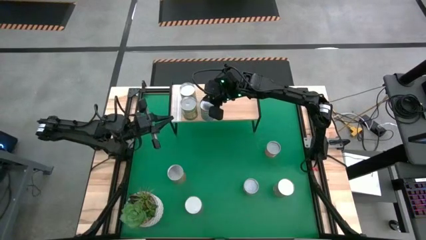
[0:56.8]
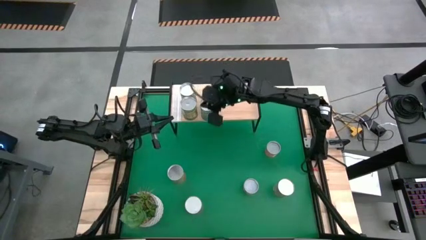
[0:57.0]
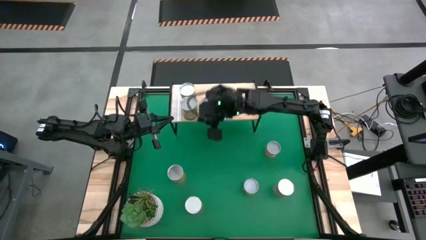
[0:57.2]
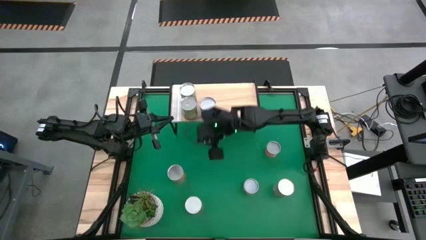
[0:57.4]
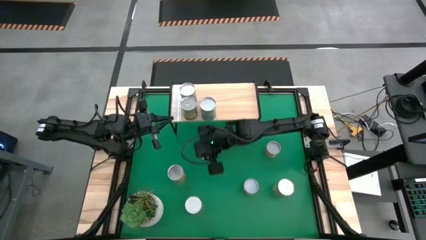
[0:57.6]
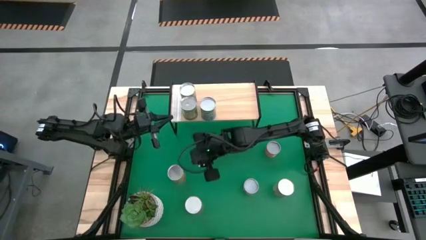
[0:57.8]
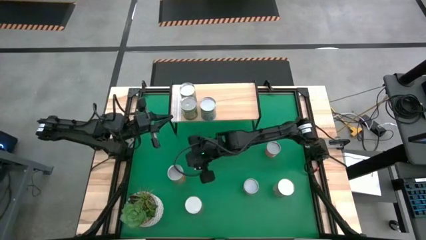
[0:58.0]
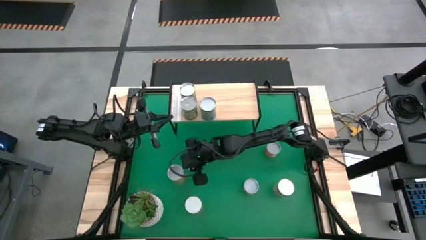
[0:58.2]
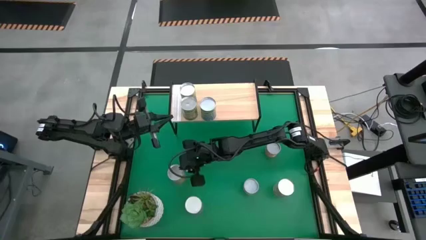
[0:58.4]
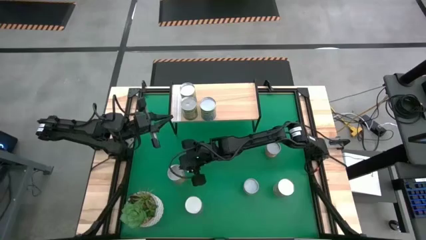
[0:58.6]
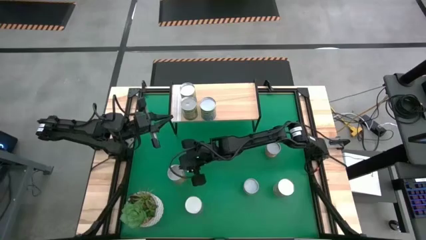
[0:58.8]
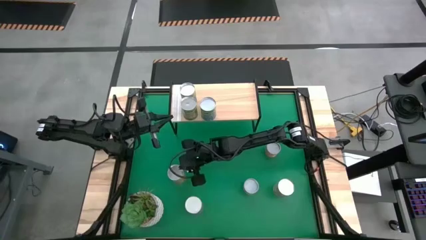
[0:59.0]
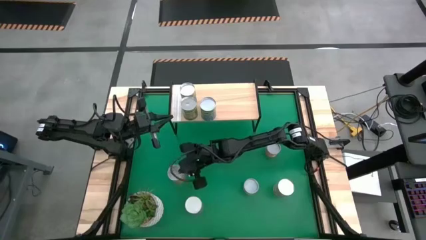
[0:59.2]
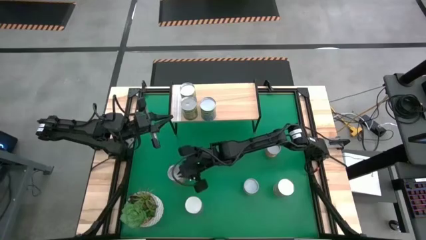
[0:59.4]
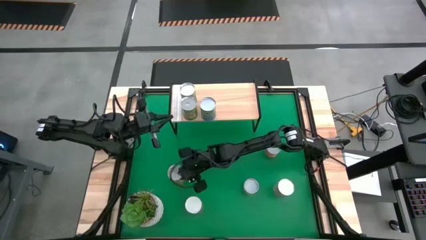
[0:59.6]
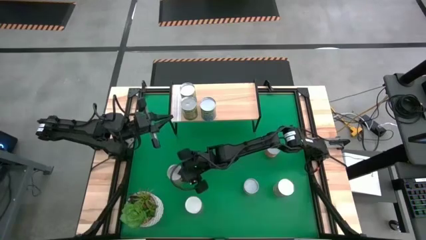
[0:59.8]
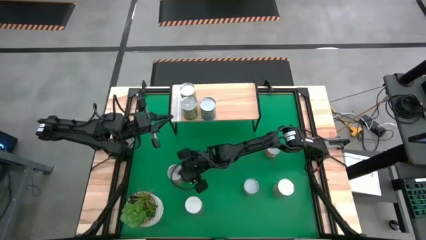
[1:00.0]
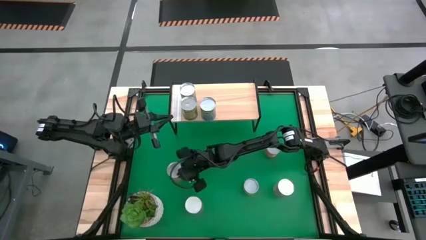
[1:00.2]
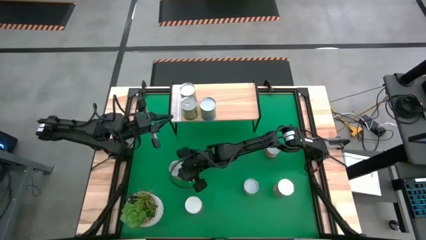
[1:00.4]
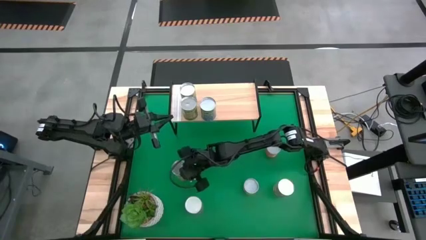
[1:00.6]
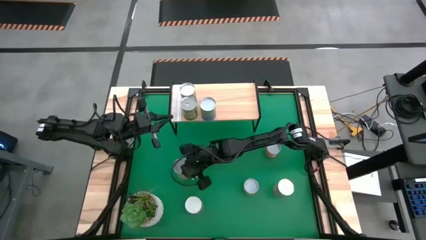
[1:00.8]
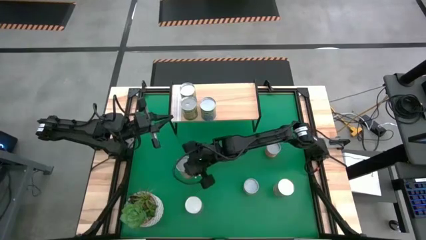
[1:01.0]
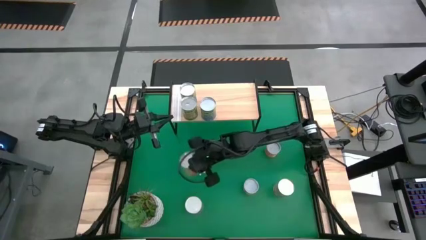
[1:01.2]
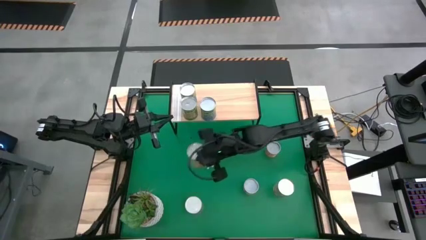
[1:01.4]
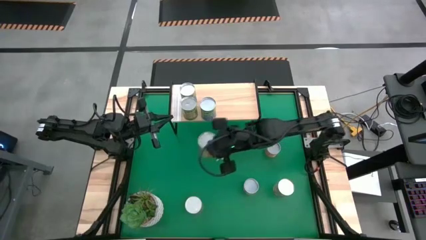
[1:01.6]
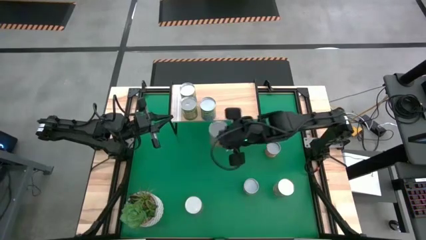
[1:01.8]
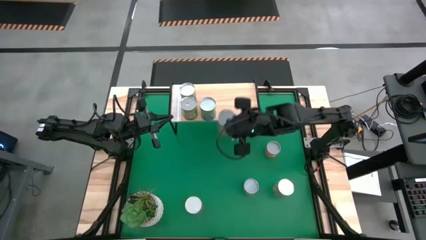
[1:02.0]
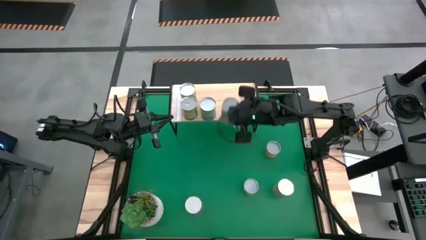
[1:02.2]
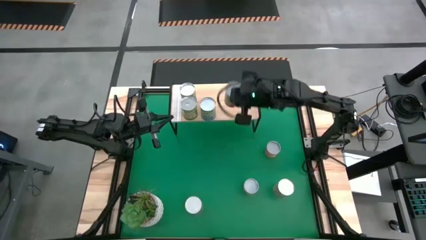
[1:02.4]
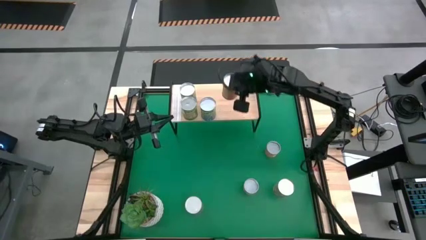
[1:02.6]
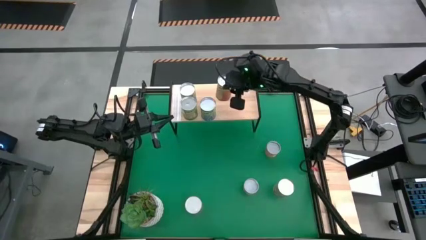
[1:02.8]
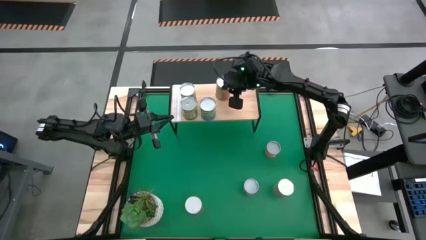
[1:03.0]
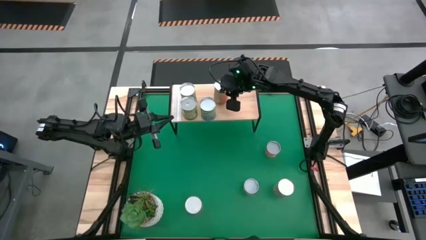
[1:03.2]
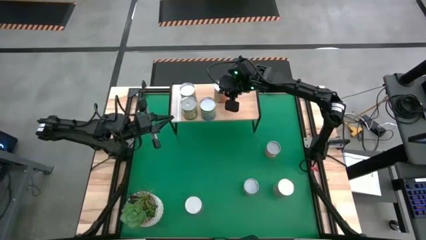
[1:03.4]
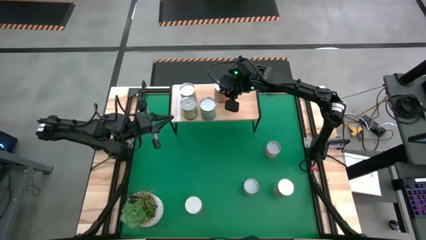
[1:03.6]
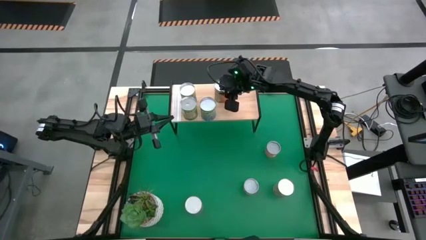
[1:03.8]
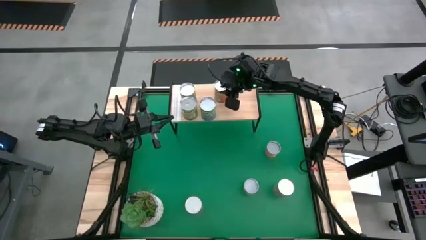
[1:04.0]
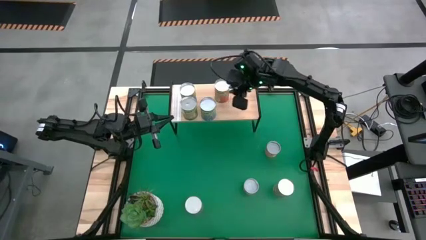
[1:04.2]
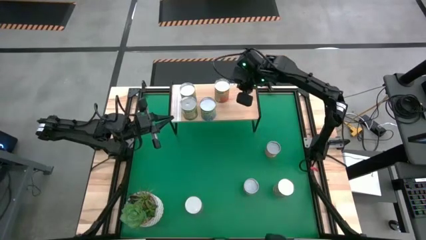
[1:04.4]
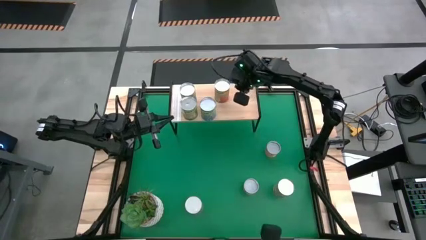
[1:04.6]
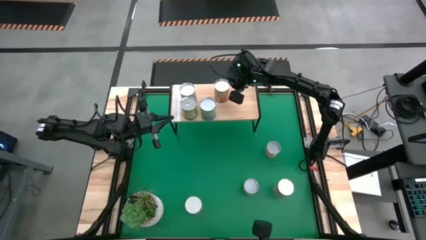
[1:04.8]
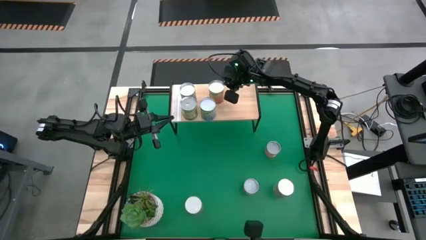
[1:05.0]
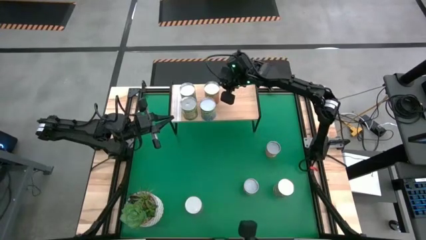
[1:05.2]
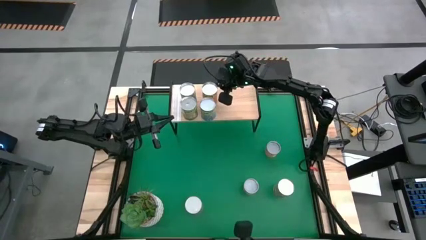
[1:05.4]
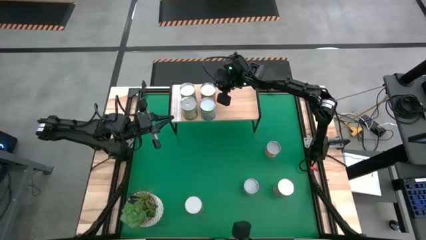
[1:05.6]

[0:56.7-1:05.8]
Task: Pick and place cans onto a shelf
Put the top canned pineapple on the shelf

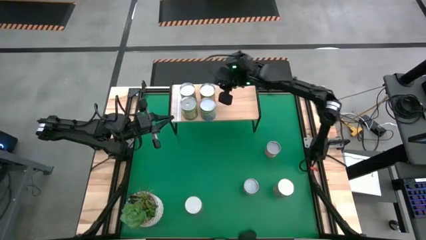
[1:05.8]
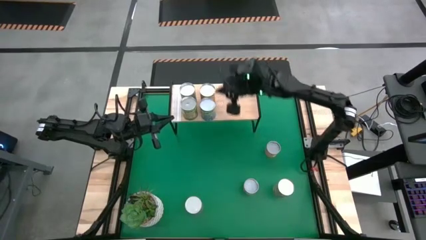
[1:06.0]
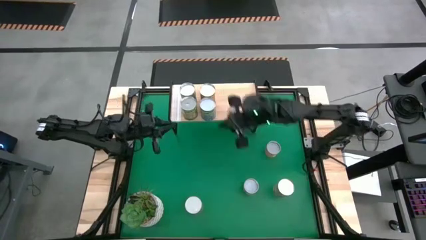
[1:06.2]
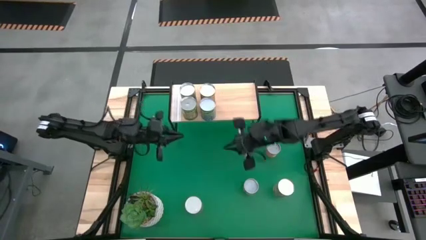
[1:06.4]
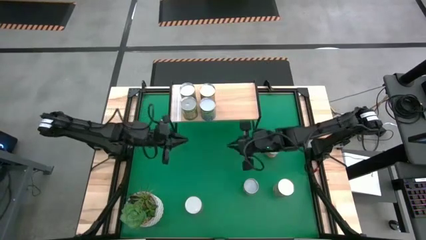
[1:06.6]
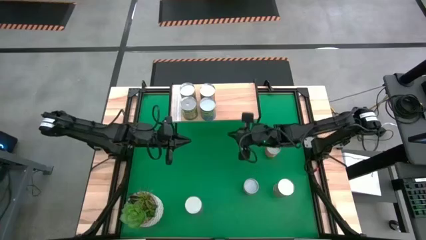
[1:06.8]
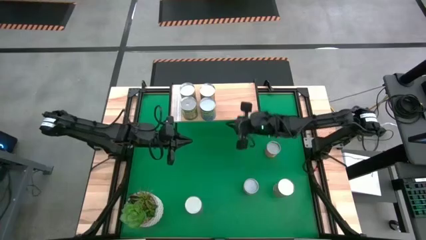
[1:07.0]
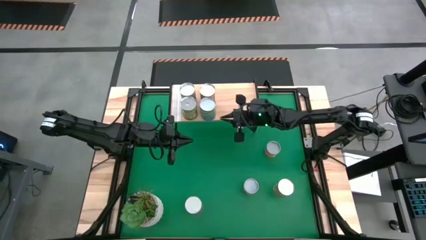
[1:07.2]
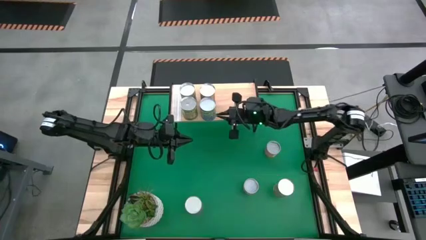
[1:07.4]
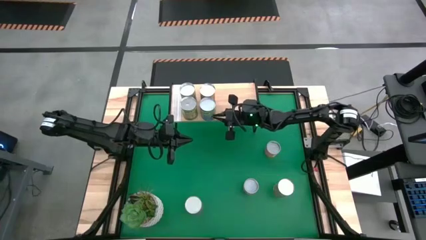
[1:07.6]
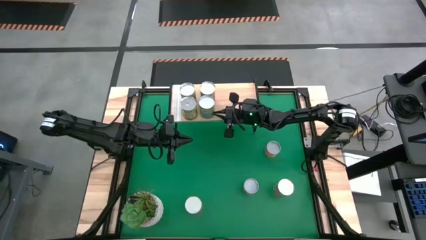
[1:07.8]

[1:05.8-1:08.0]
Adjust the canned cherries on the shelf

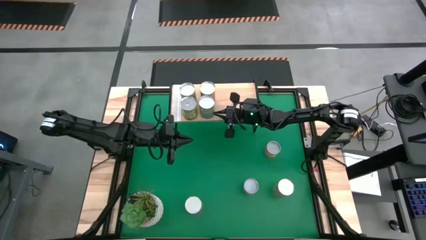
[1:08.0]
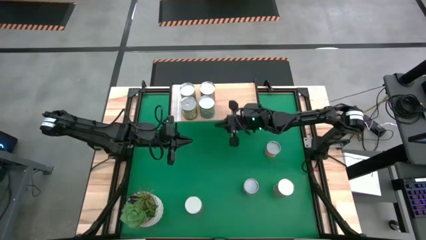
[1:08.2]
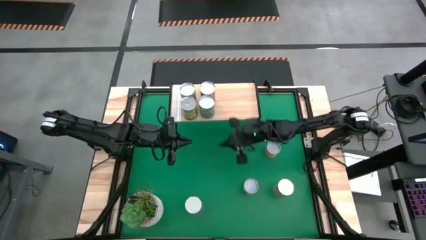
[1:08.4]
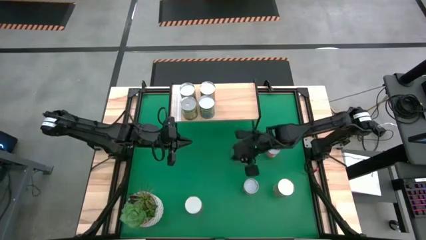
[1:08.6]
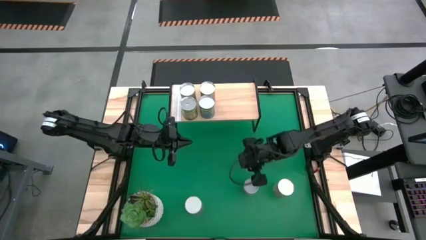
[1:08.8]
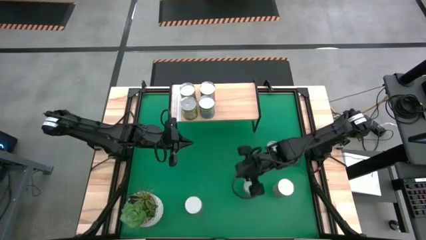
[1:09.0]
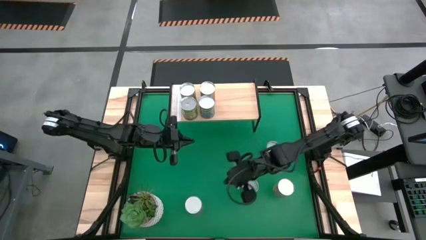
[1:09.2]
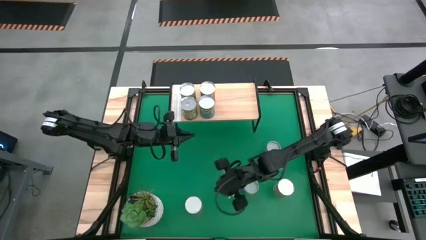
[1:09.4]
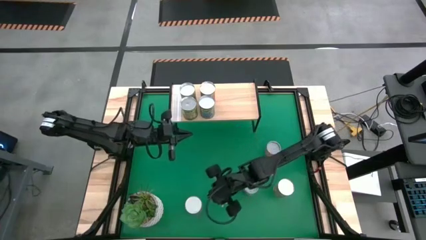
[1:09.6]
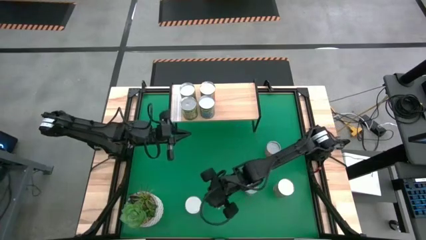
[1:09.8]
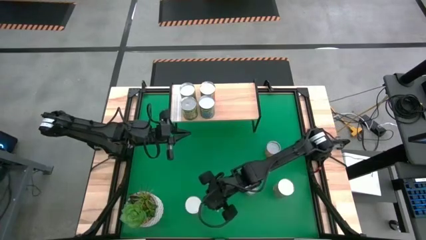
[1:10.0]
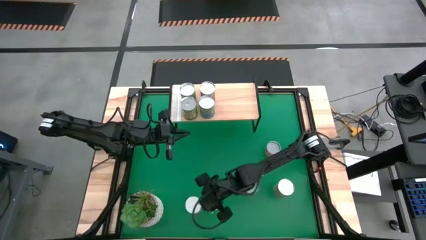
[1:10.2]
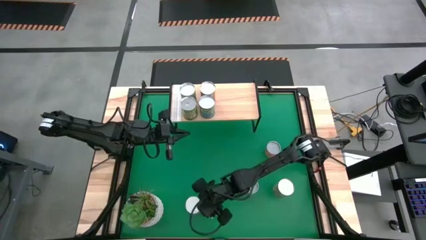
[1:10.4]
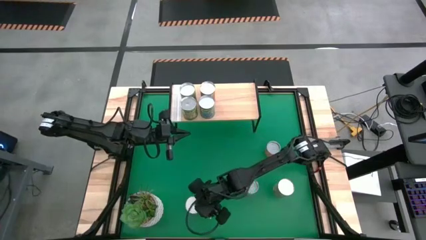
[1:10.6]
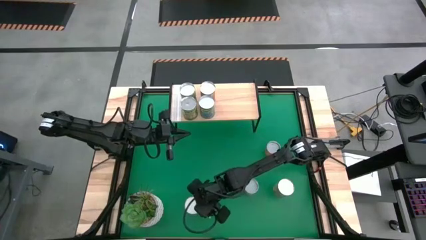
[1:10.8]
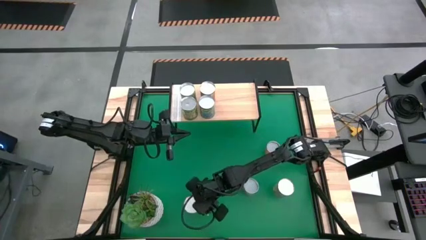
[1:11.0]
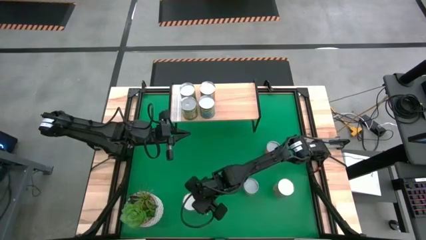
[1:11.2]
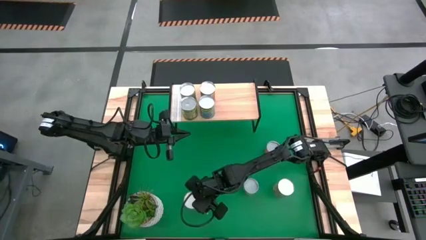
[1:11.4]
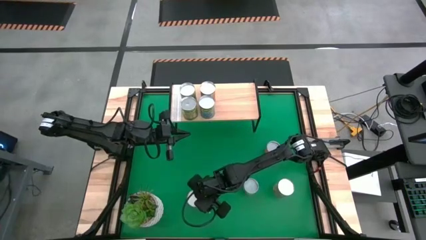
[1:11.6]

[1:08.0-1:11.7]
Put the canned pineapple on the shelf
